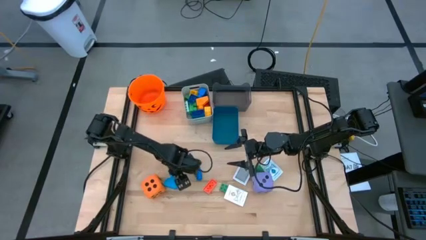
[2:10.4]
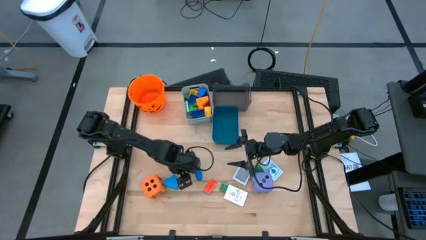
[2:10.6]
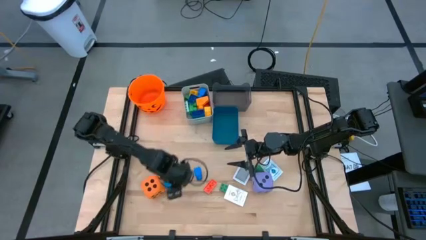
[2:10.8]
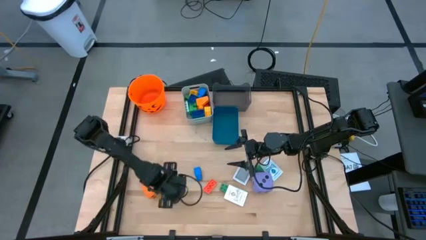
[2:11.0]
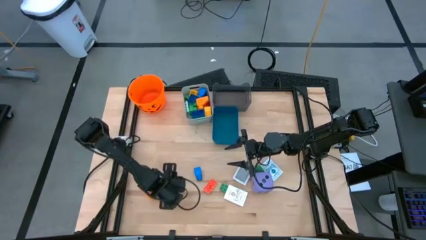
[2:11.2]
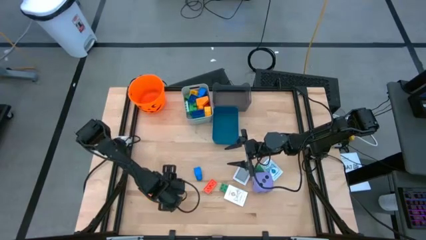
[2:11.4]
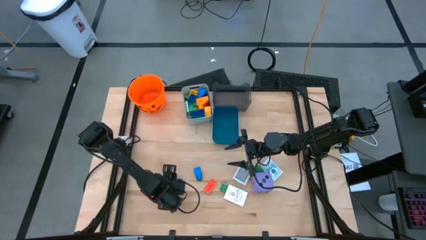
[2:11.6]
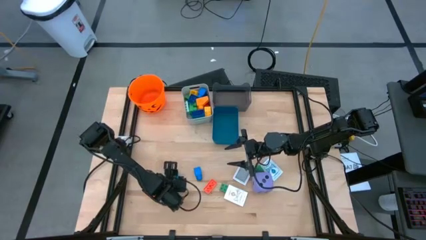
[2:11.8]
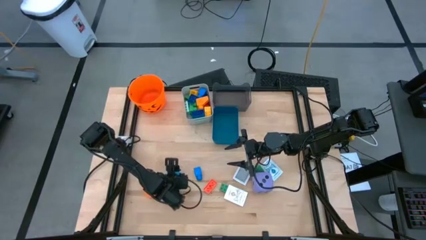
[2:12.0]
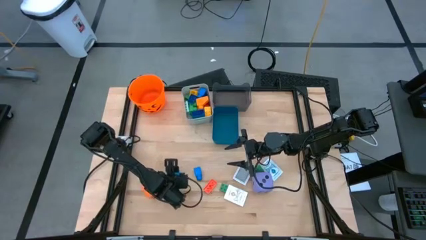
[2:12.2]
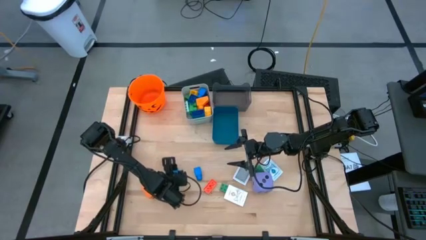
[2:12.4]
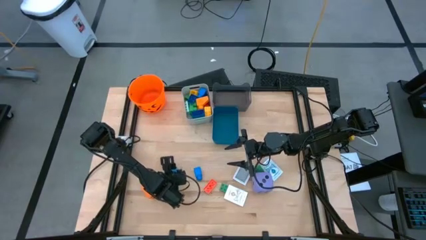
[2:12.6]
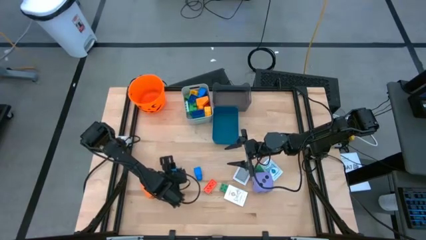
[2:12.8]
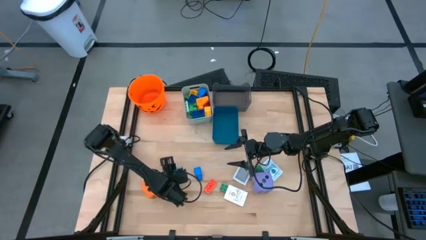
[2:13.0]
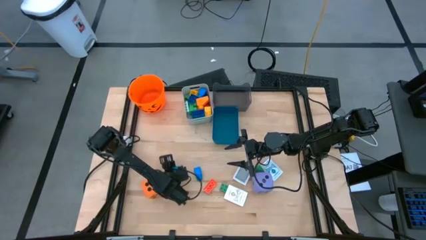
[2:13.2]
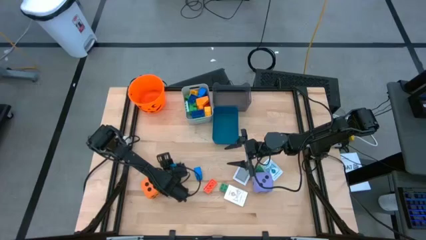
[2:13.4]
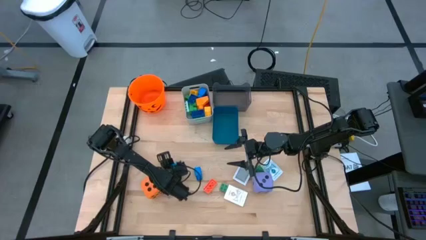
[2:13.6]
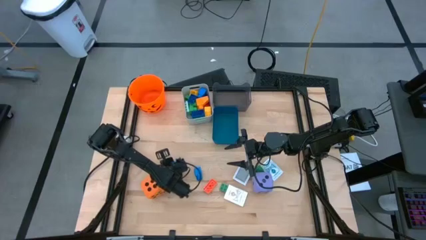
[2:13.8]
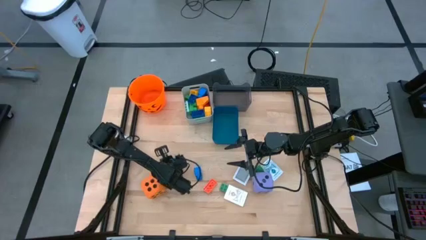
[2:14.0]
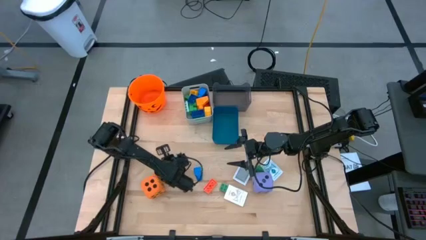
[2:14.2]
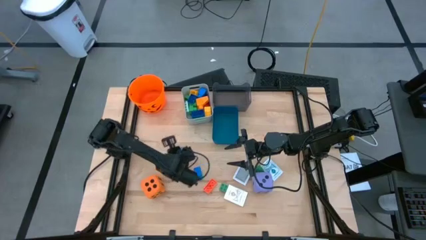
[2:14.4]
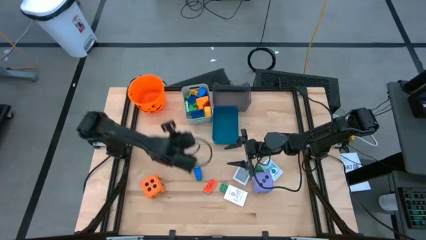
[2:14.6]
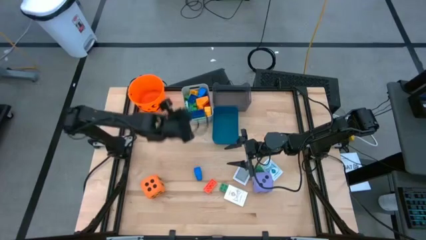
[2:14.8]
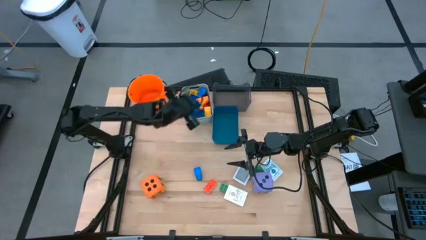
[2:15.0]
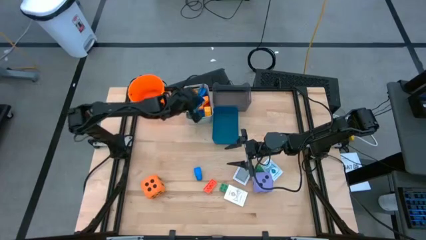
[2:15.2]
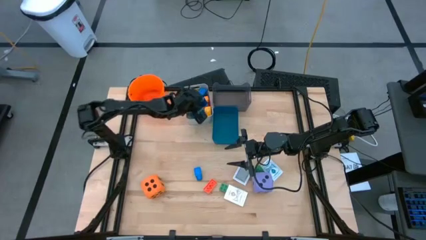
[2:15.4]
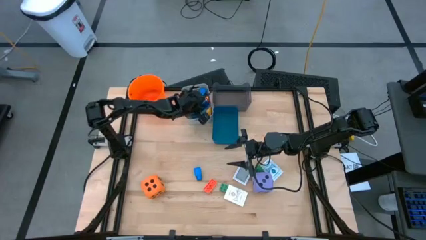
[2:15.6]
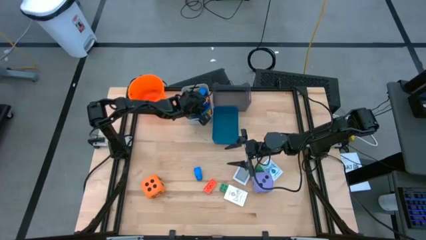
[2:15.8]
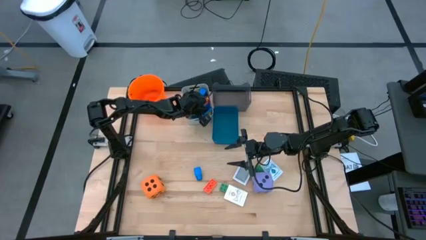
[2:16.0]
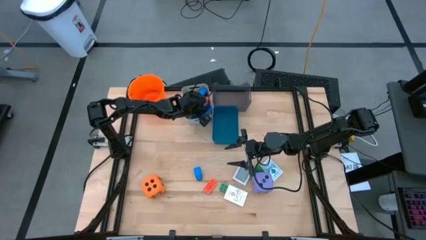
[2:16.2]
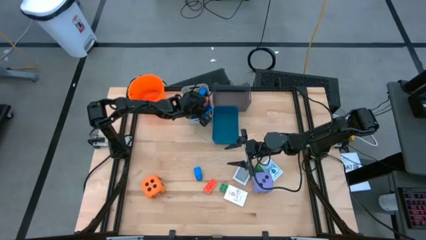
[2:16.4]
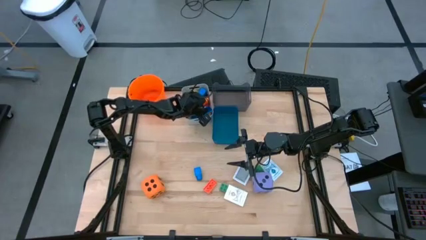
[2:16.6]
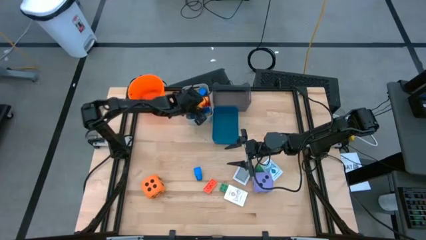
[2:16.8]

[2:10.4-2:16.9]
Task: Pick & Place Toys
Put the light blue 1 stud gamepiece into the white bin

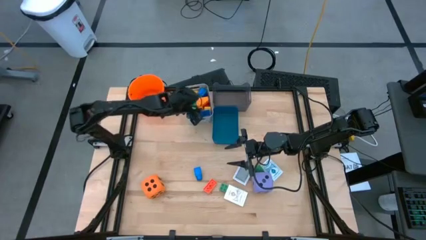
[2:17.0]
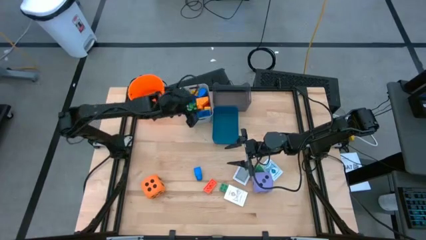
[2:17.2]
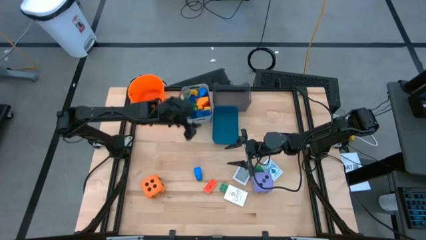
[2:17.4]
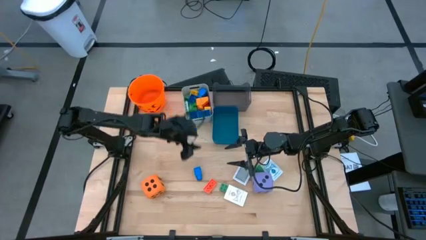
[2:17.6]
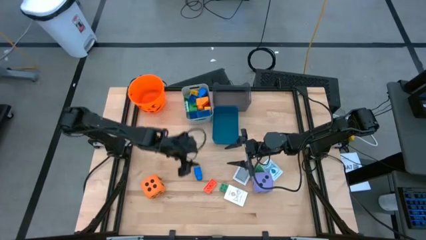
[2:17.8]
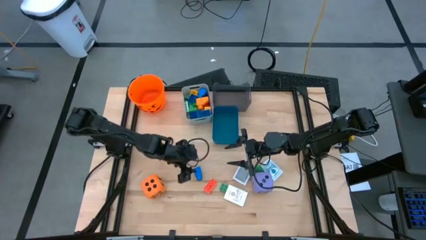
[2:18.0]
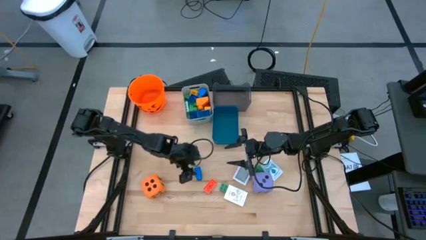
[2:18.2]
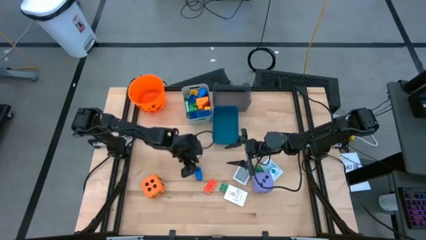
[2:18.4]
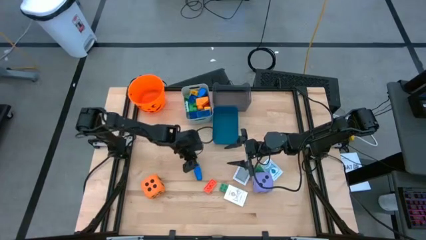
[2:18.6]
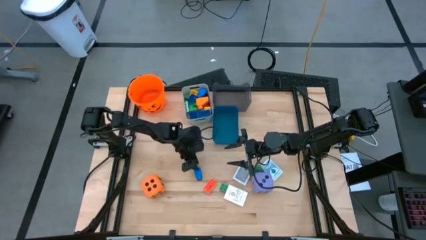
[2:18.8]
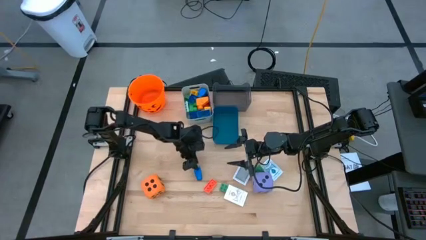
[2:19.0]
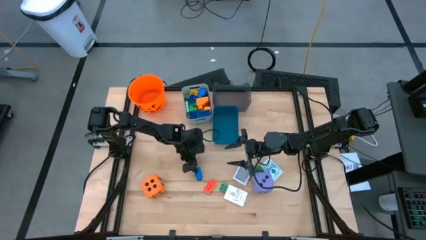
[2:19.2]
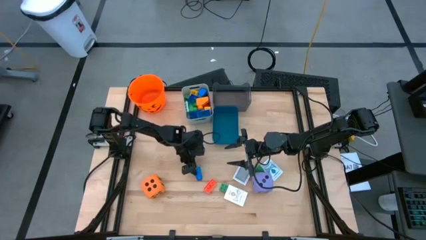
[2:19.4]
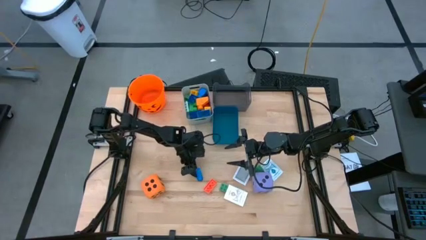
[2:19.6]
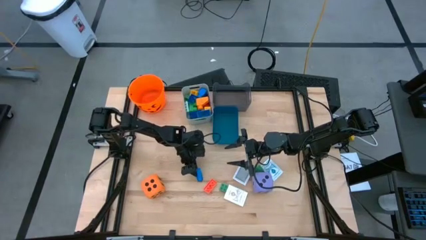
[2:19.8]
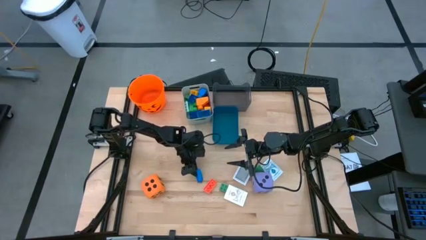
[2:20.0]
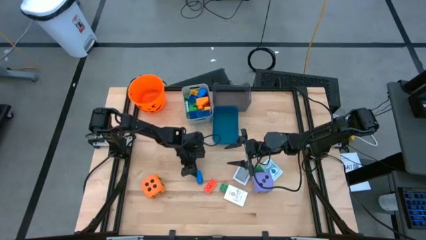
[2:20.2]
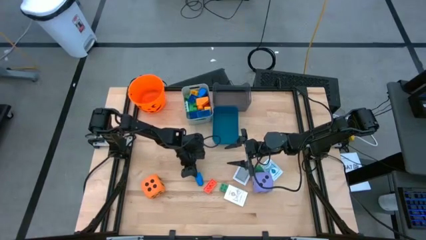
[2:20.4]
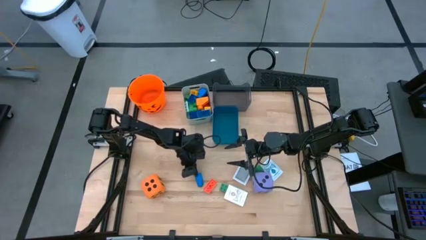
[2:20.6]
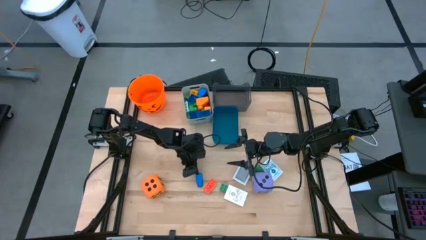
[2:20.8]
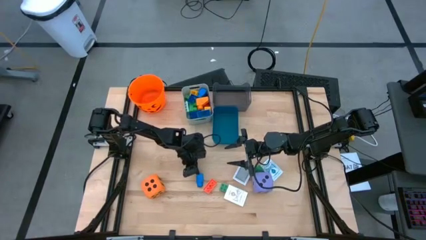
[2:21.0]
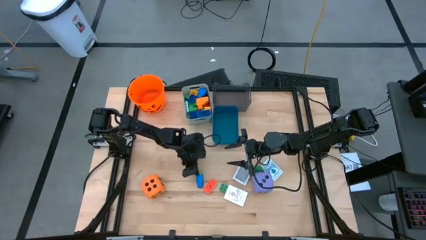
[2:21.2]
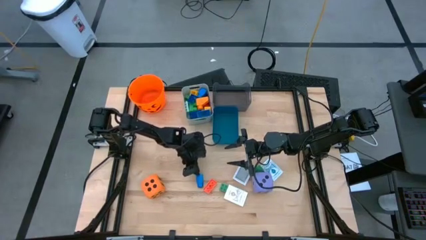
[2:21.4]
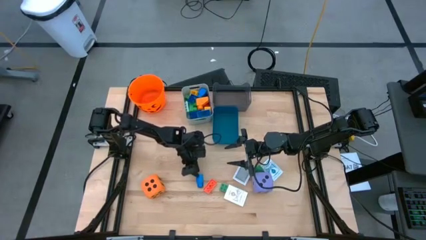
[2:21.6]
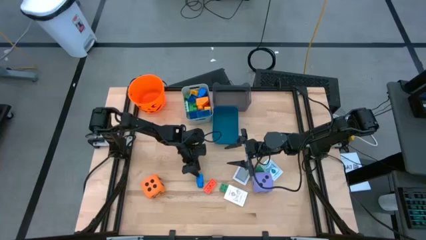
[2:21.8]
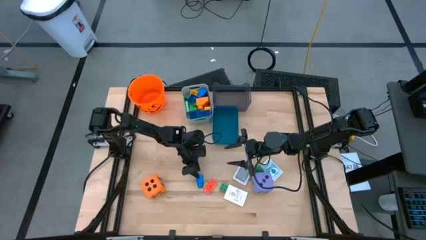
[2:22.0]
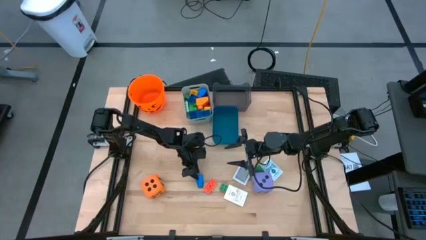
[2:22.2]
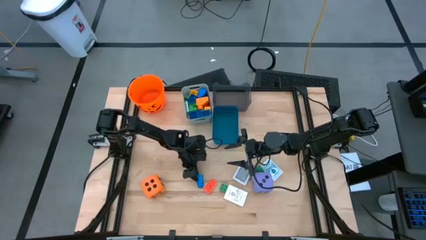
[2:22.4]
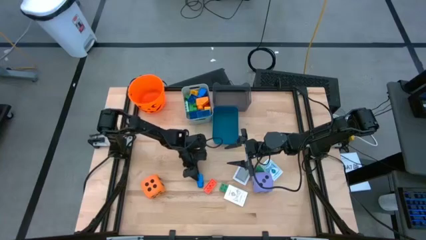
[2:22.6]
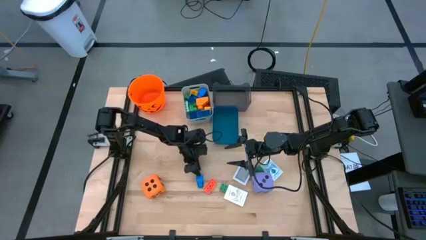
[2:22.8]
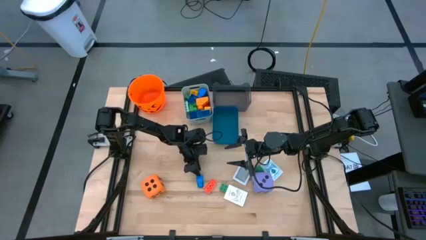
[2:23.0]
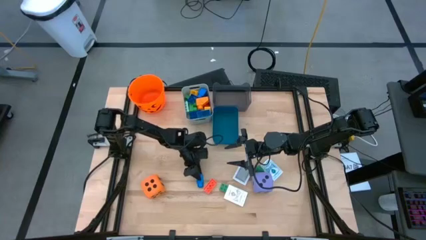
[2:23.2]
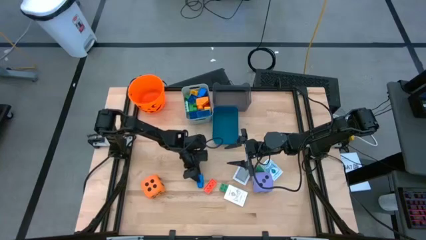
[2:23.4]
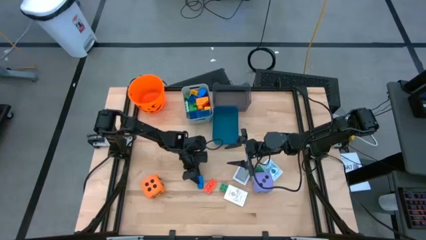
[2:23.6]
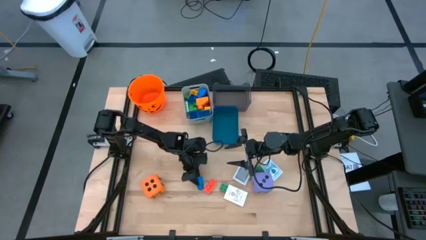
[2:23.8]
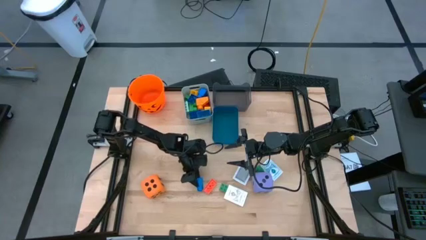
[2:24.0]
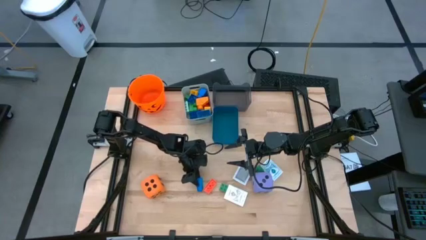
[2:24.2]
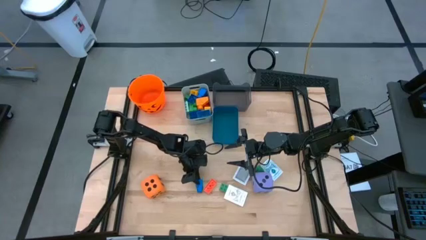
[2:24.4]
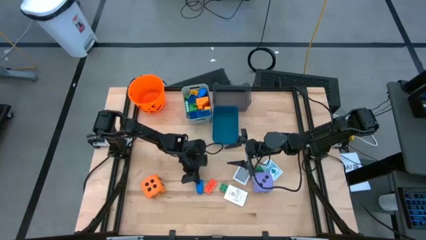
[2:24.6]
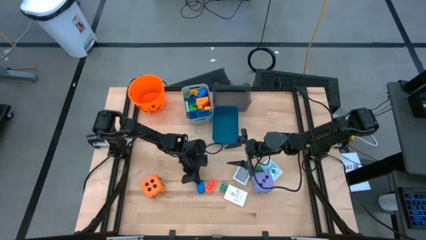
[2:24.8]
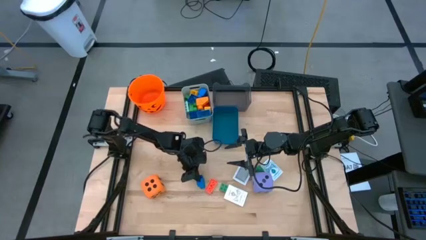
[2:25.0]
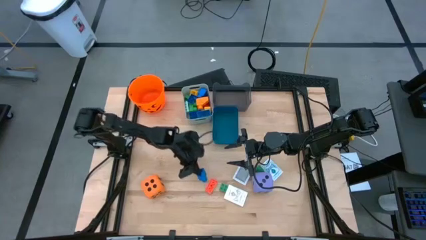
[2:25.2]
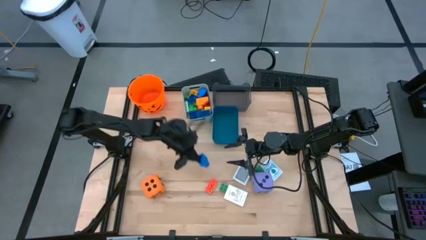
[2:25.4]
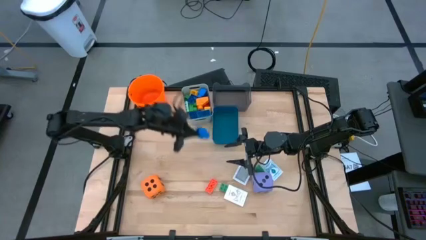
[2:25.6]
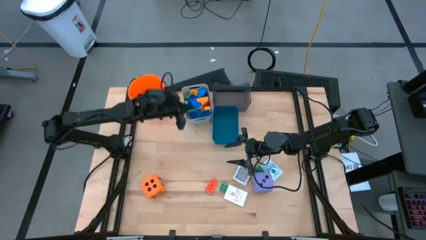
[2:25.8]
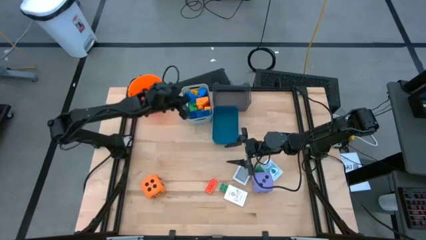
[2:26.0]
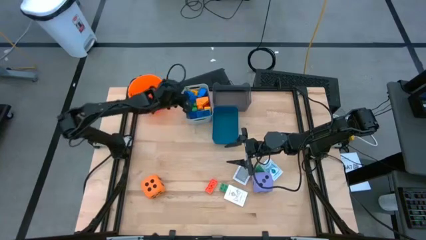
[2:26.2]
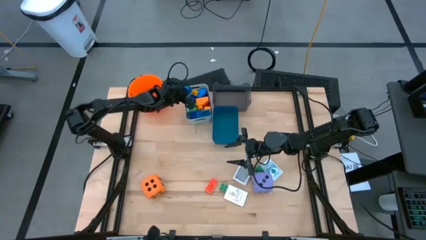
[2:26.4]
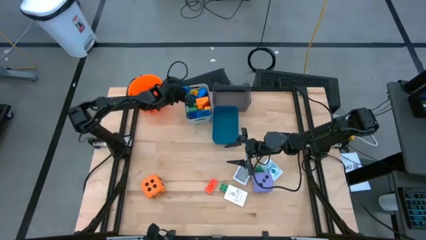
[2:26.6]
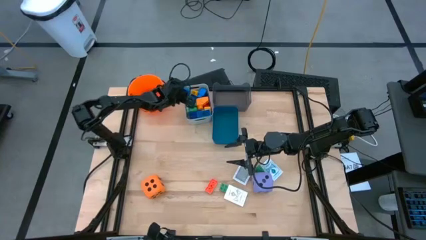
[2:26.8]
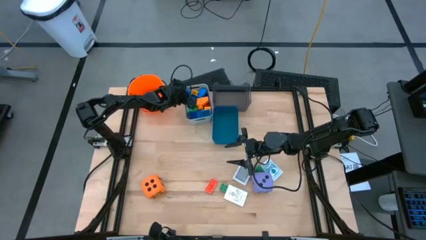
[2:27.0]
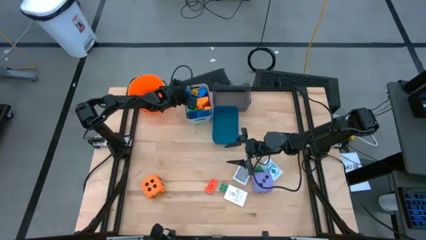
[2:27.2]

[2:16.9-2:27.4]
Put the blue 1 stud gamepiece into the white bin

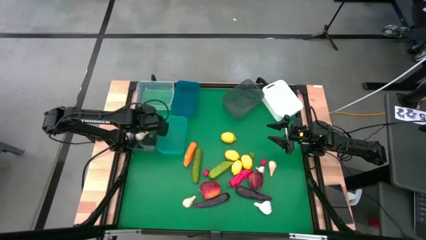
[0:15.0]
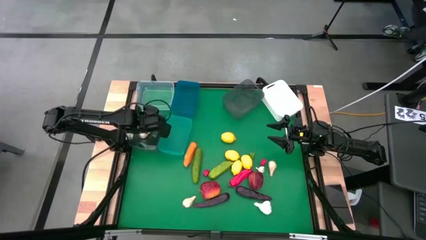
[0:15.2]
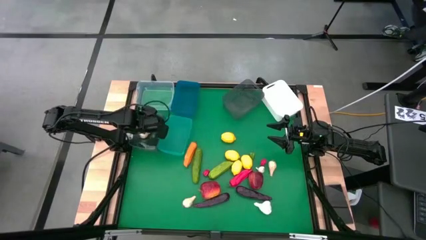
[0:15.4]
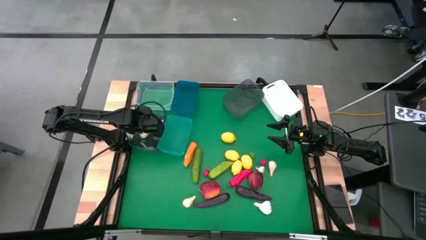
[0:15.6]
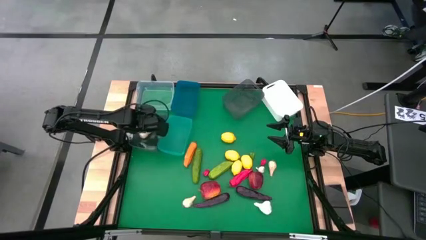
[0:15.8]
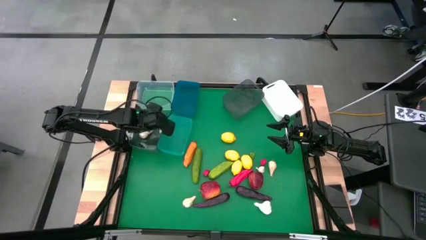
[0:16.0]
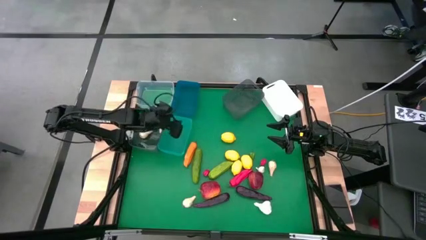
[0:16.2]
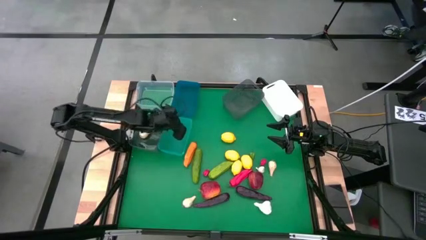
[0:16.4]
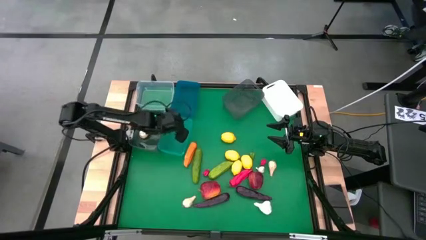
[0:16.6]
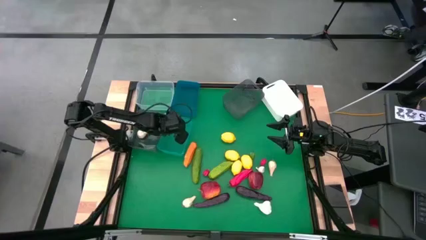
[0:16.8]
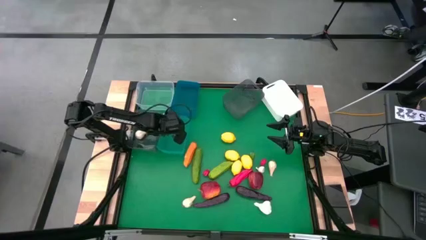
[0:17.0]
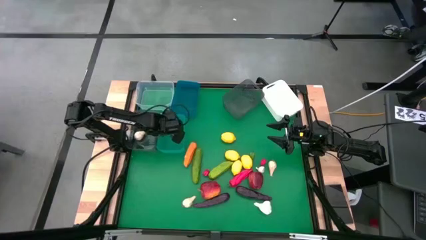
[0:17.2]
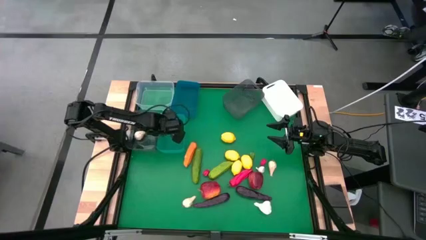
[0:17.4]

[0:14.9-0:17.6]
Task: Sort produce into baskets
Adjust the colored bins
